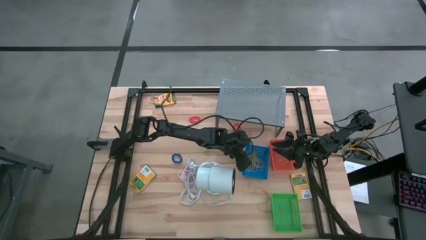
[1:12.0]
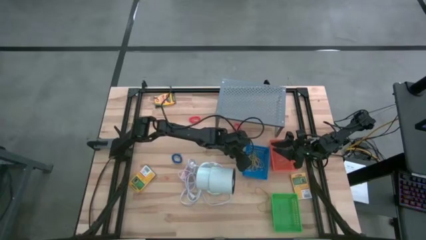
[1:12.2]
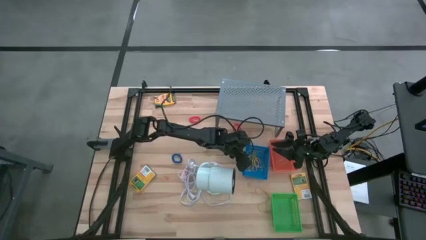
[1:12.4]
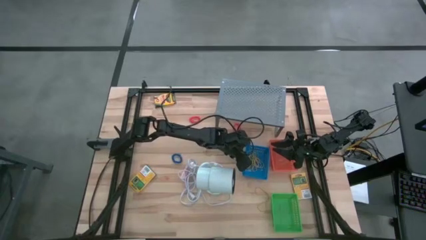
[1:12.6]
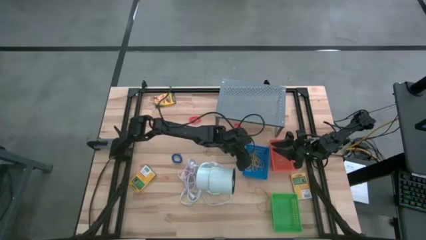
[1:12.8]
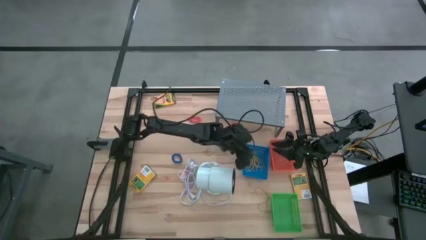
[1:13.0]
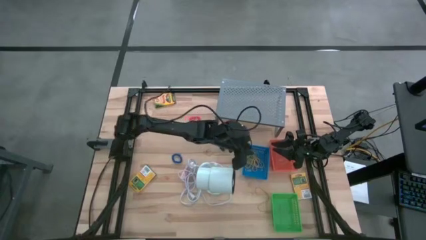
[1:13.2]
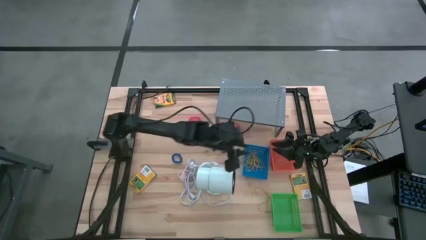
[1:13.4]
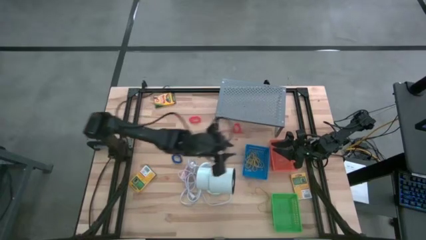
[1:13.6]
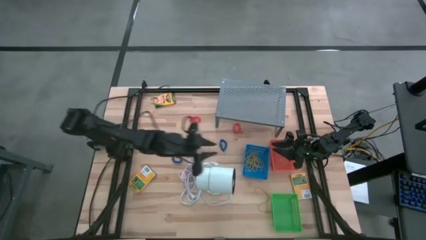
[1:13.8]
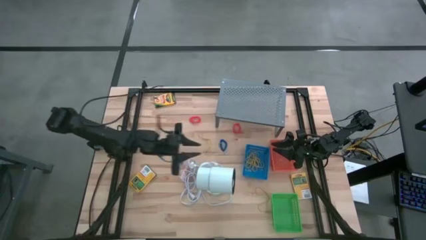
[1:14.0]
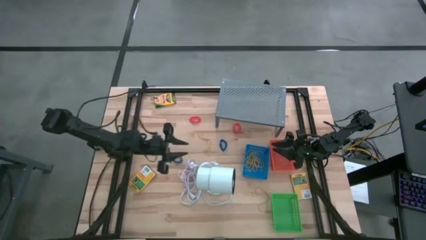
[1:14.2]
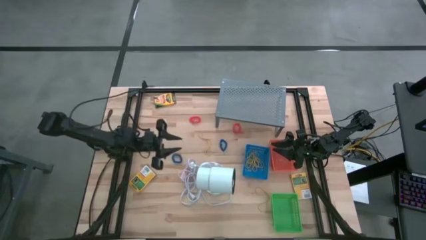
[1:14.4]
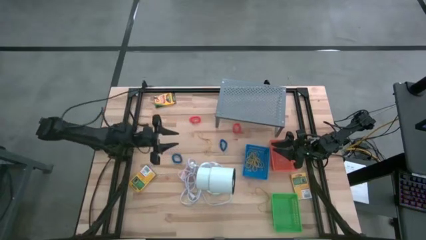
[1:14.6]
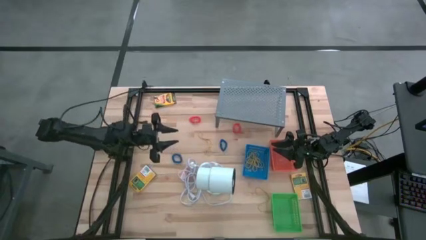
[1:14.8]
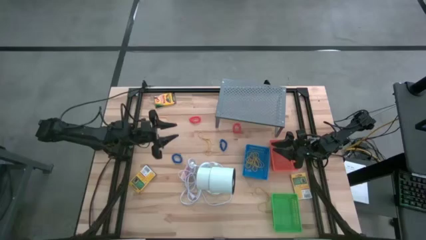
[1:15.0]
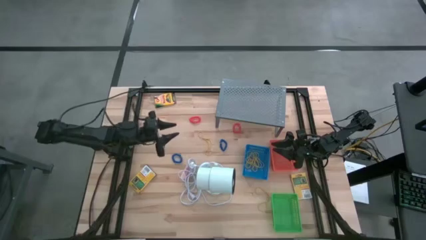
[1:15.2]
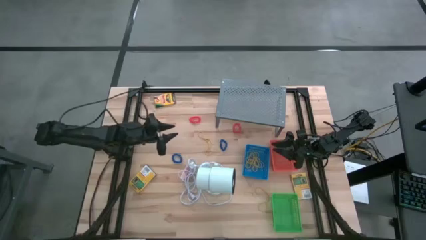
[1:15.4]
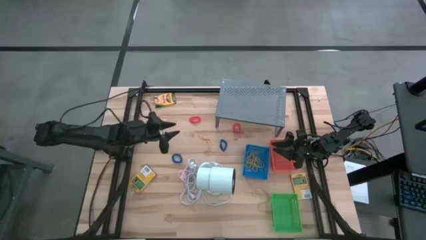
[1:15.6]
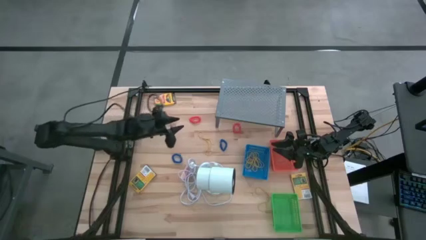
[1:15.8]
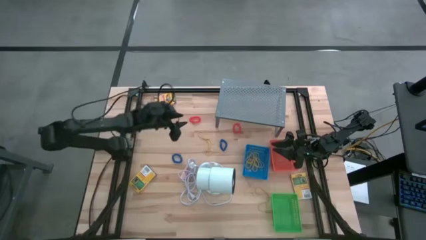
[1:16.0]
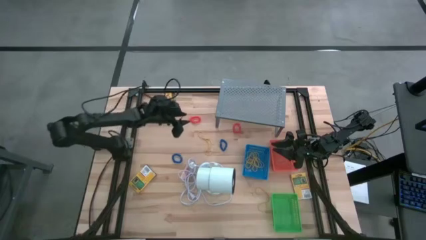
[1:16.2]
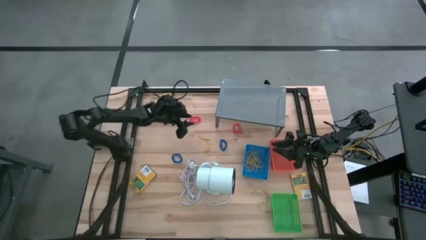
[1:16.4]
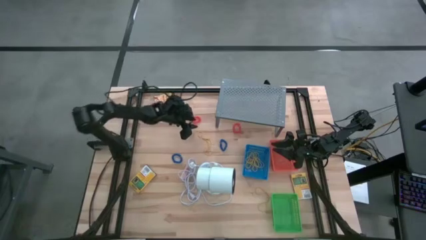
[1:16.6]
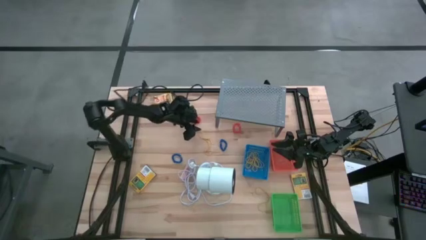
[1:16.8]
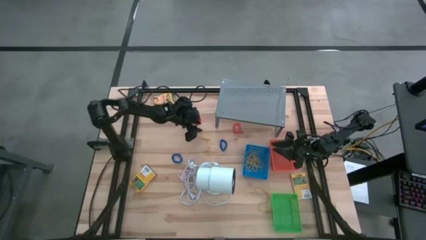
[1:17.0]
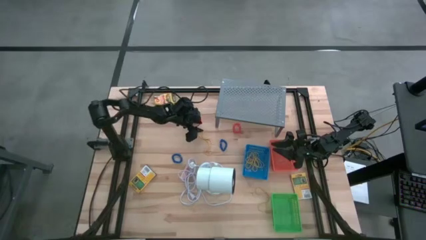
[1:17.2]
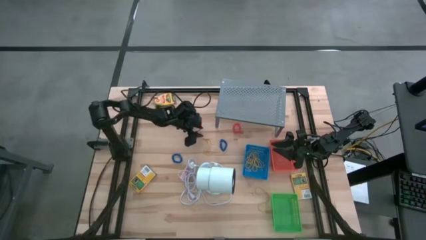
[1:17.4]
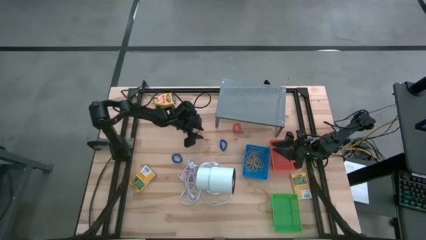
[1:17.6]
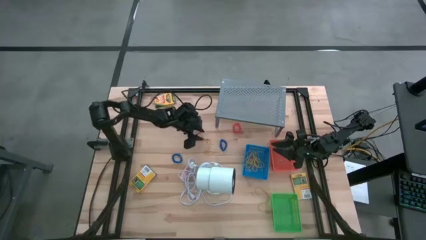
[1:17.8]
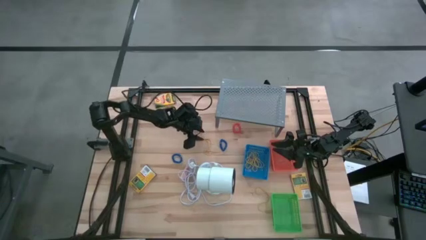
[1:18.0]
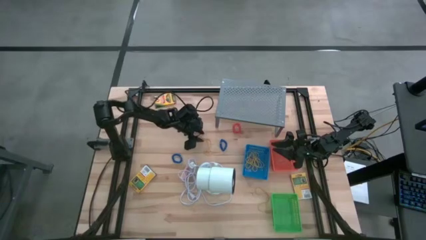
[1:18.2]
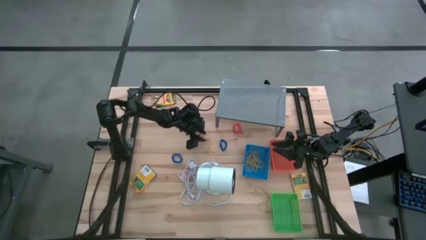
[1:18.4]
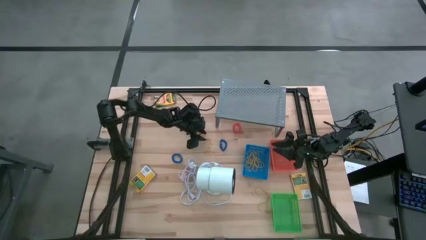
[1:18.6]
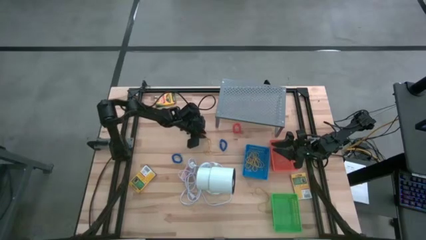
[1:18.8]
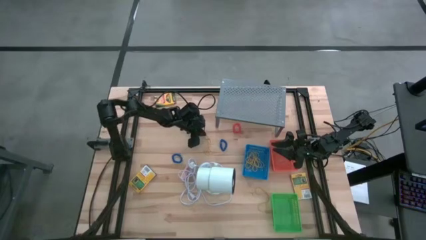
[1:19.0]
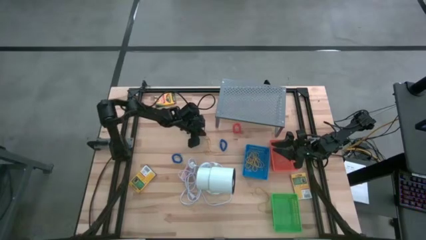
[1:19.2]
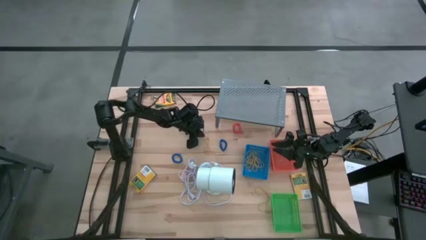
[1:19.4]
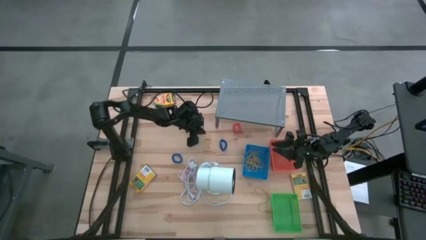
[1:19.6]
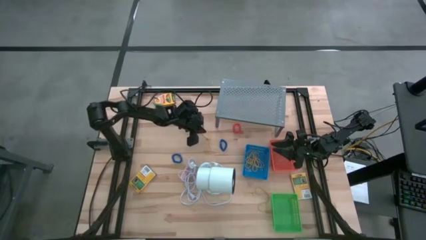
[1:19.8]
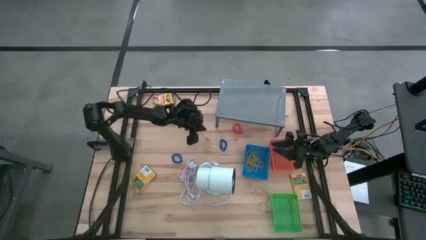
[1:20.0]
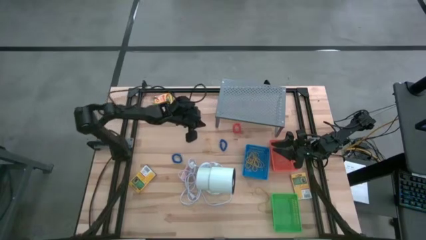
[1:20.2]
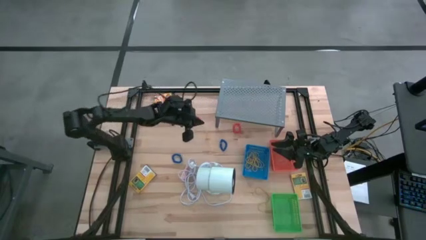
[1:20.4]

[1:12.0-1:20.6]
Task: Pick & Place Office Desk Supplies
Put the yellow rubber band into the blue bin

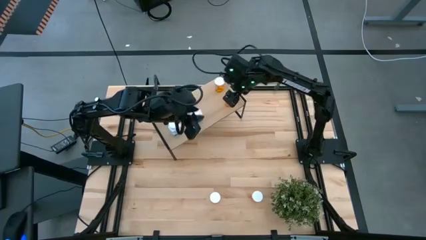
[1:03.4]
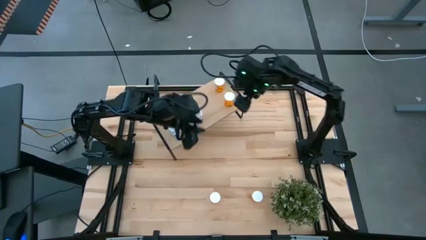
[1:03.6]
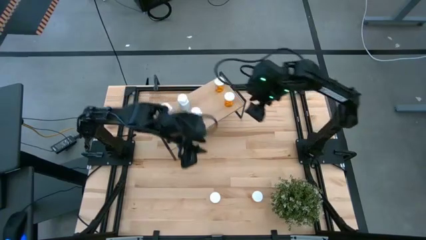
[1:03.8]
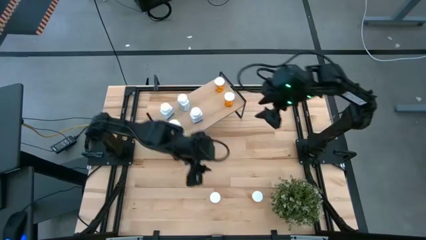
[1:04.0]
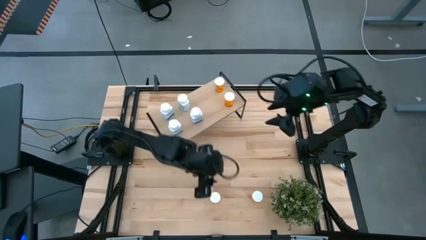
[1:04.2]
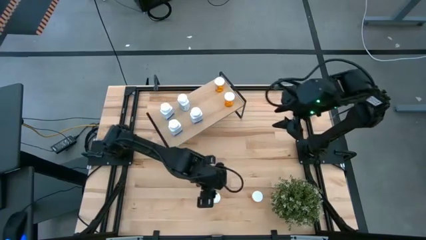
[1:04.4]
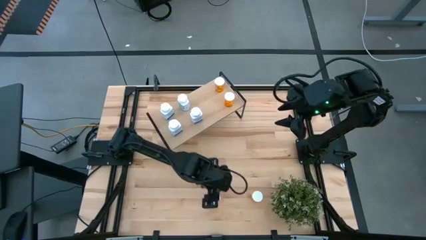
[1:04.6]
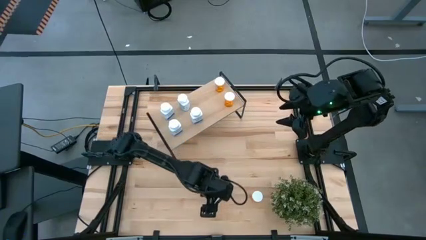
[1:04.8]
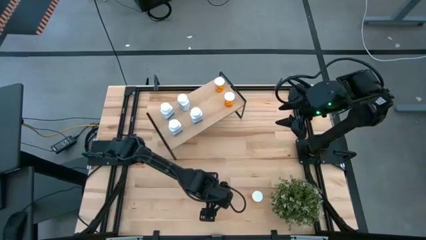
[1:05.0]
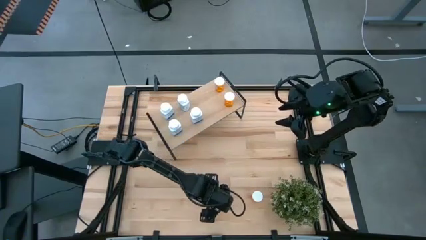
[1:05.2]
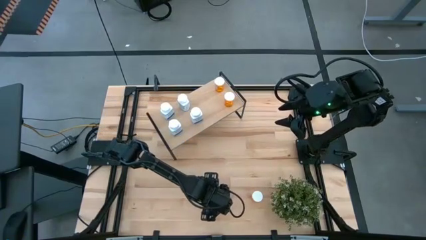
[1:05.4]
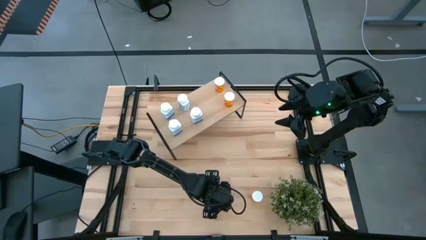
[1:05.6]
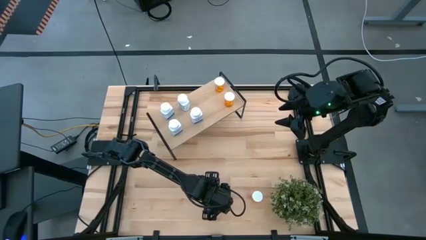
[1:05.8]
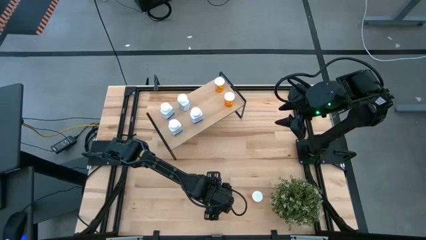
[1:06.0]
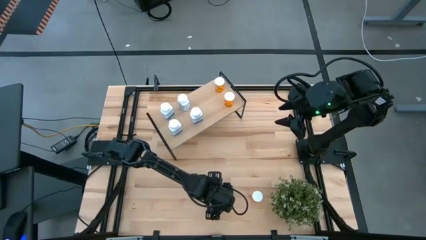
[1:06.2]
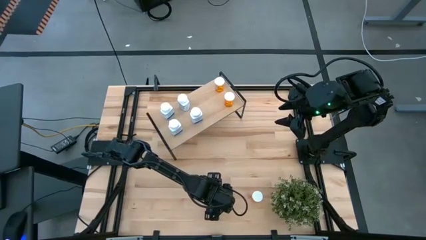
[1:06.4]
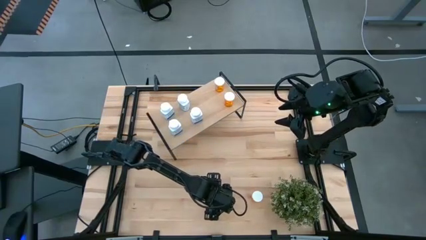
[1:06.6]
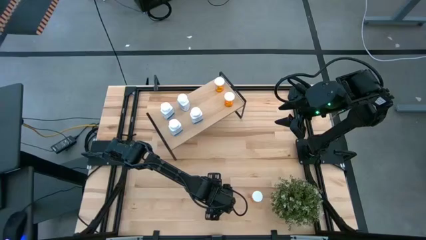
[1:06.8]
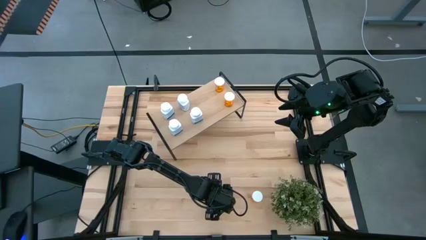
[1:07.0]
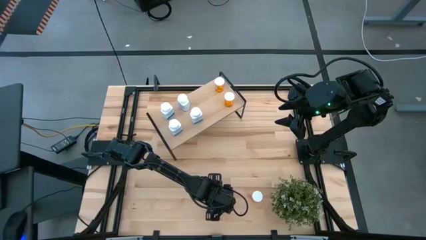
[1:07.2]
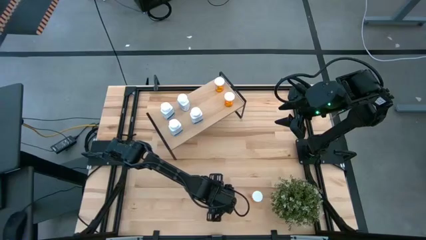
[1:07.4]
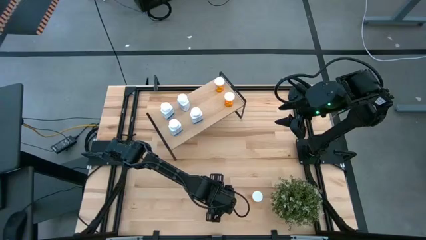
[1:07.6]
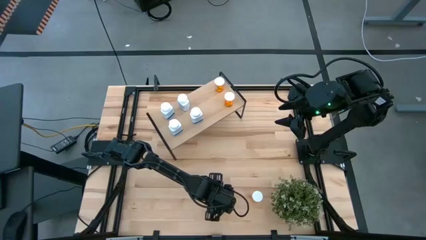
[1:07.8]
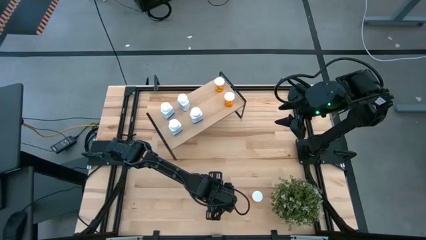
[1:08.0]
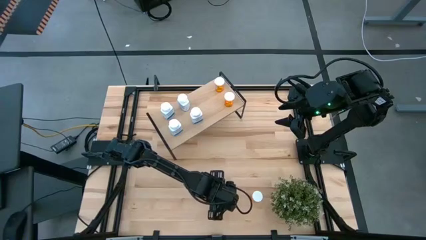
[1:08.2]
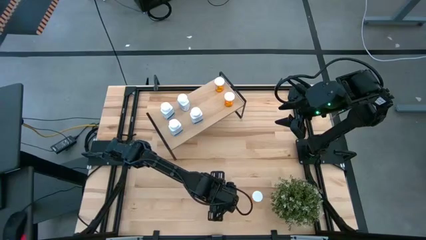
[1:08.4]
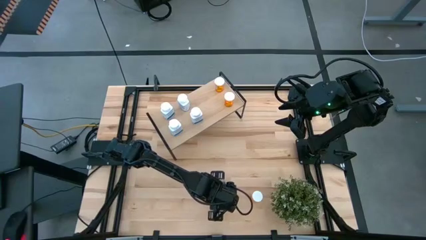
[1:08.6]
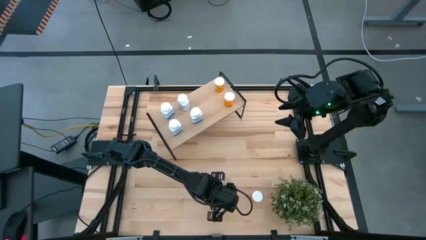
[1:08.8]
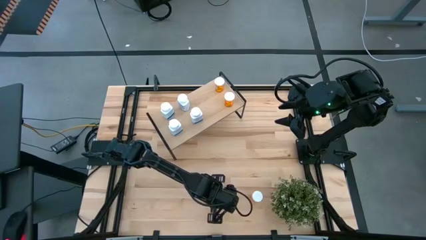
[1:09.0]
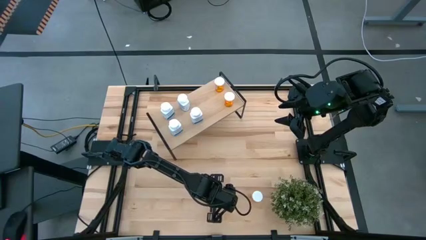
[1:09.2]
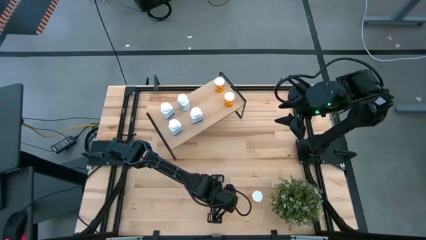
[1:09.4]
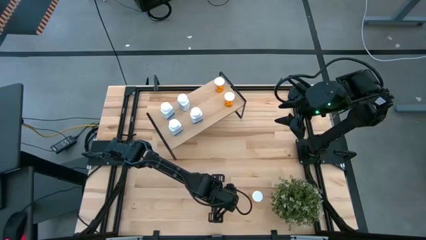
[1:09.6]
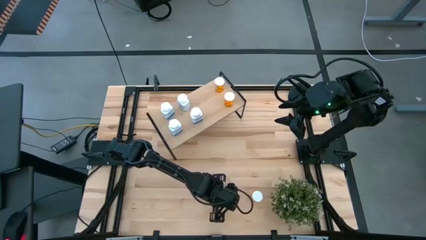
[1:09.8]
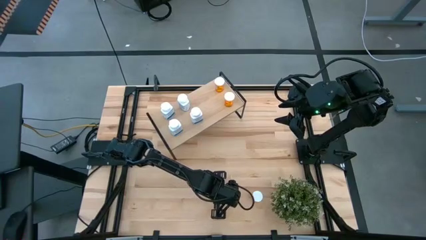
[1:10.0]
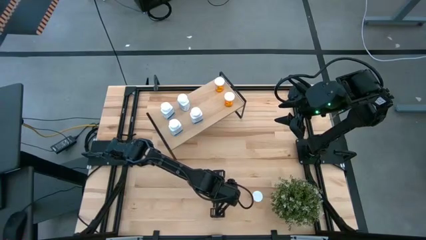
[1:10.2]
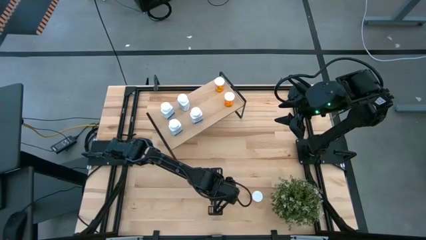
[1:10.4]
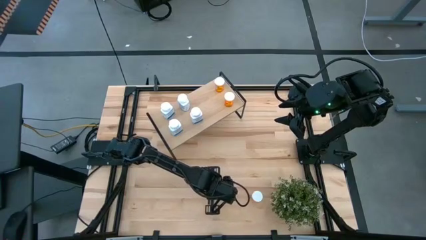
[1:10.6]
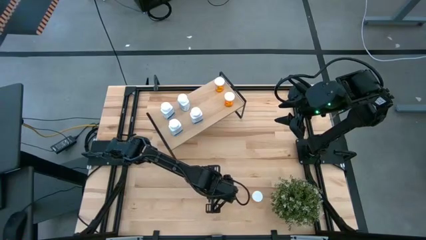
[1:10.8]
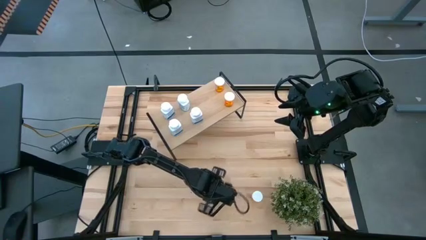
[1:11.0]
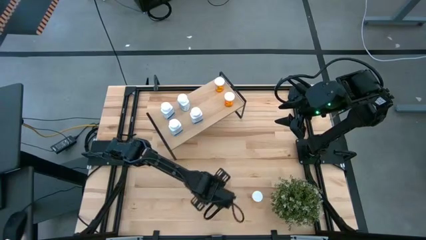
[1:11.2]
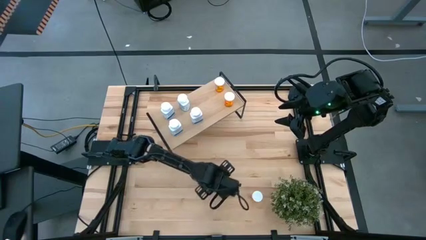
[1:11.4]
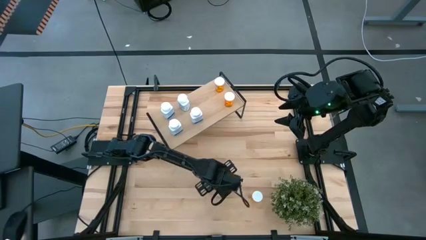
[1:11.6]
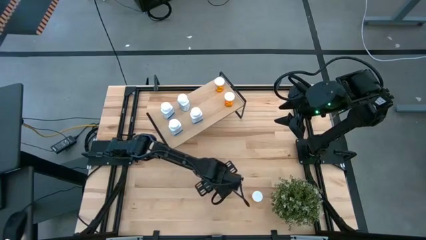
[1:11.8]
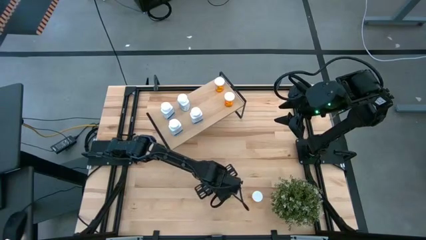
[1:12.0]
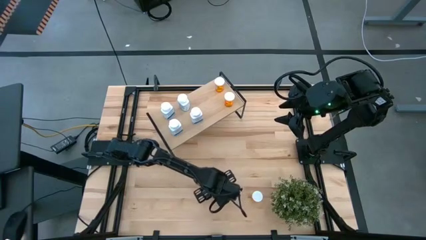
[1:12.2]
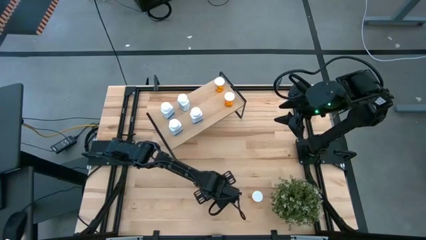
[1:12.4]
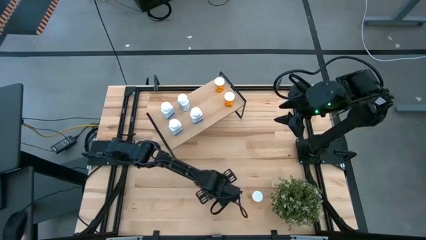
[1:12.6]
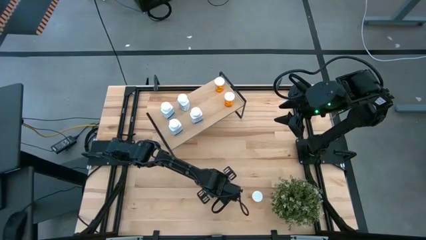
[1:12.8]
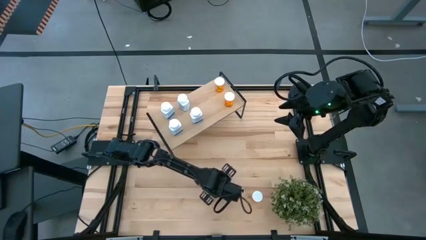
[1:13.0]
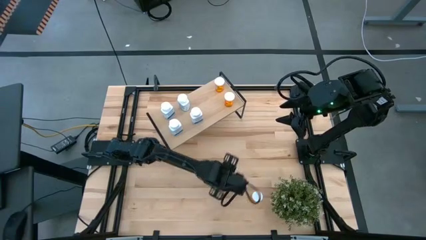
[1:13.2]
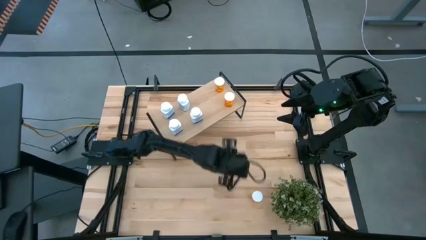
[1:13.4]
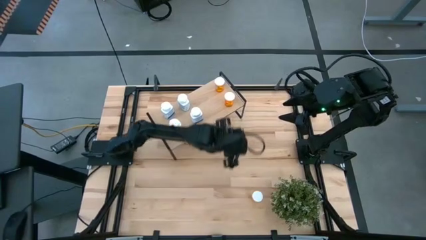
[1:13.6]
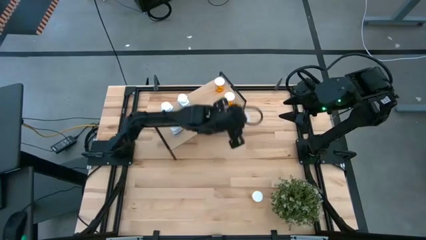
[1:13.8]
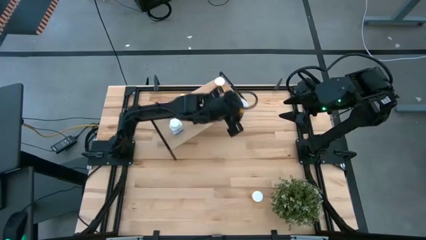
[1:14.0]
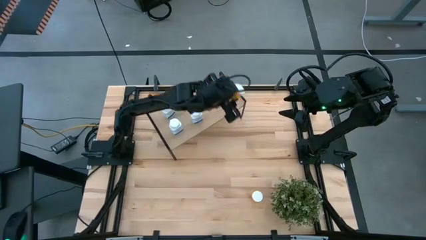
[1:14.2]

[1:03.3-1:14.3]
Task: Pick and place medicine bottles onto shelf by color
Put the orange pill bottle on the shelf
